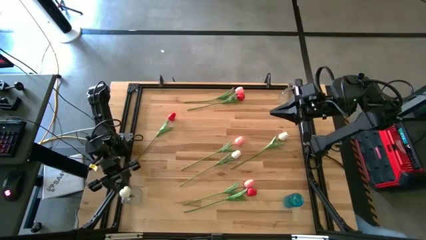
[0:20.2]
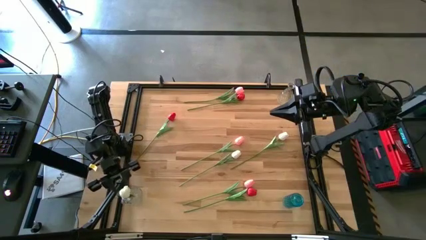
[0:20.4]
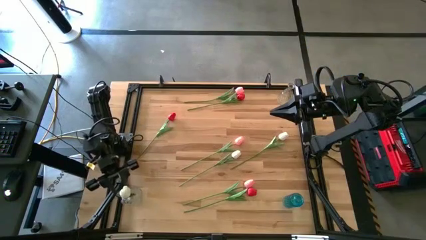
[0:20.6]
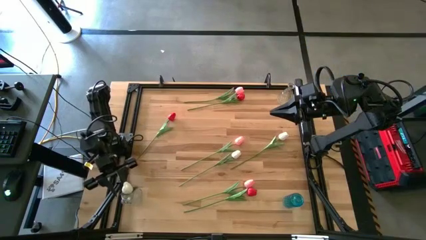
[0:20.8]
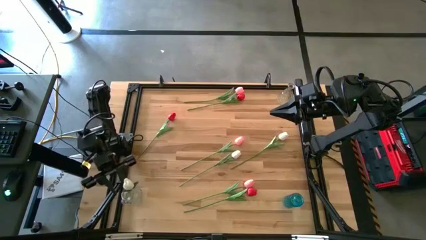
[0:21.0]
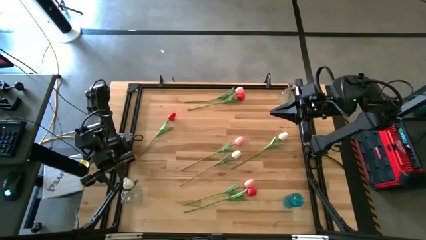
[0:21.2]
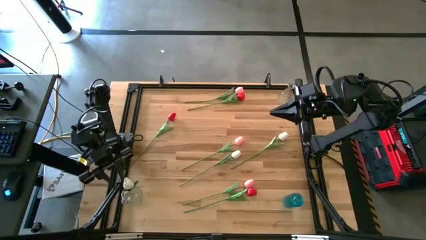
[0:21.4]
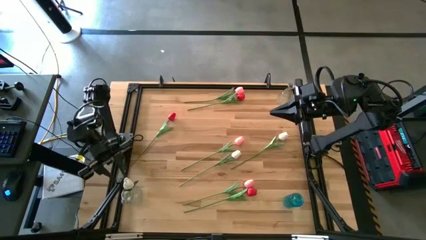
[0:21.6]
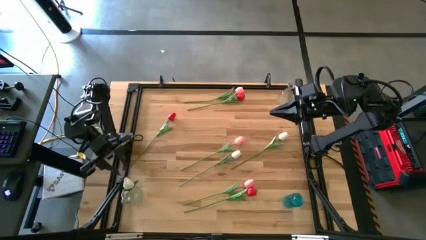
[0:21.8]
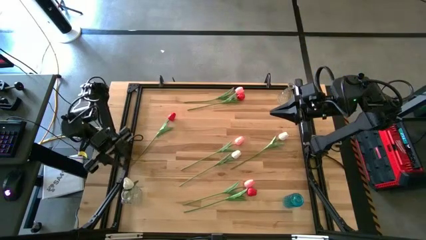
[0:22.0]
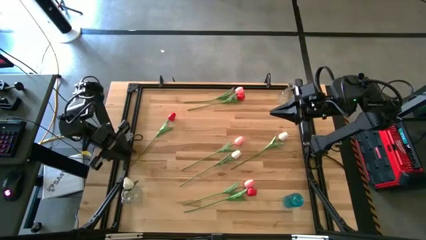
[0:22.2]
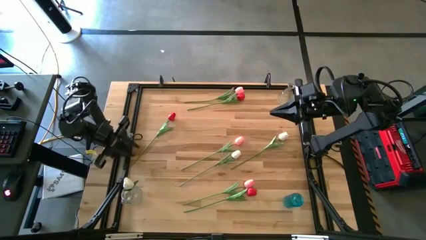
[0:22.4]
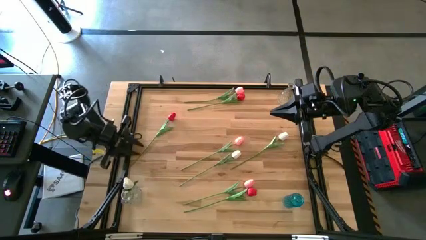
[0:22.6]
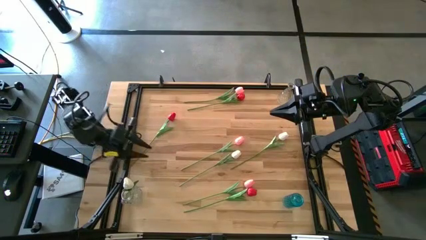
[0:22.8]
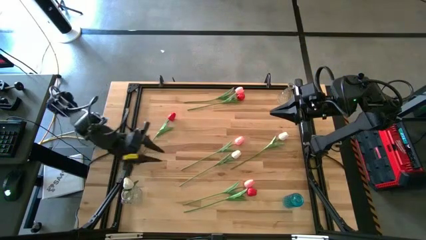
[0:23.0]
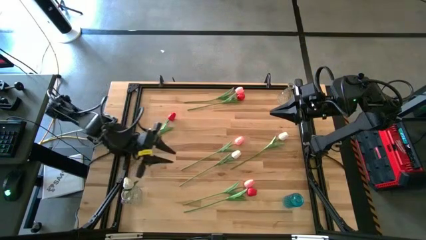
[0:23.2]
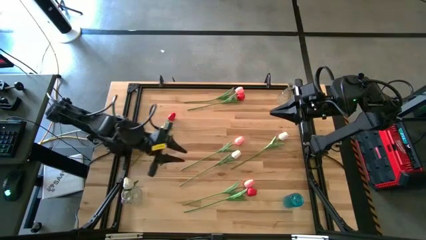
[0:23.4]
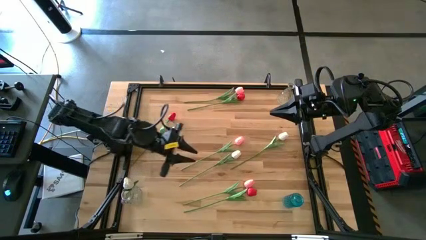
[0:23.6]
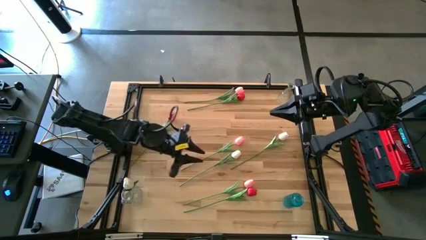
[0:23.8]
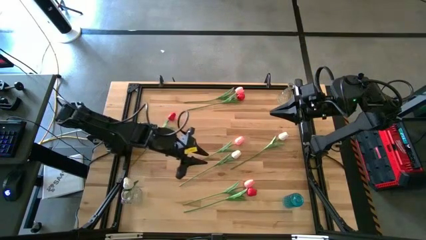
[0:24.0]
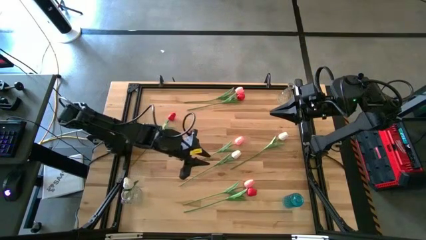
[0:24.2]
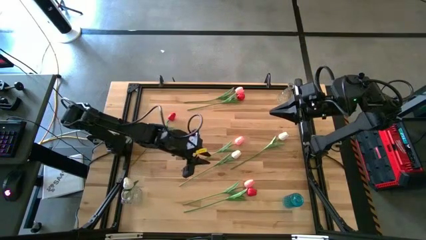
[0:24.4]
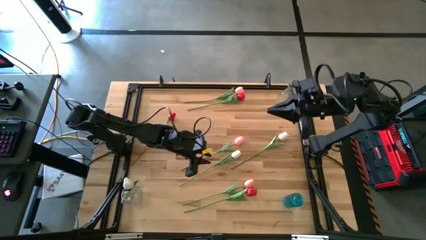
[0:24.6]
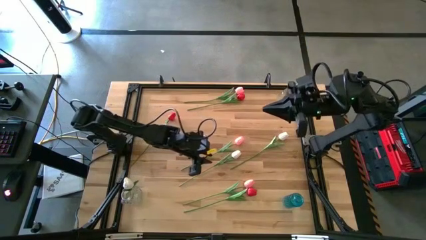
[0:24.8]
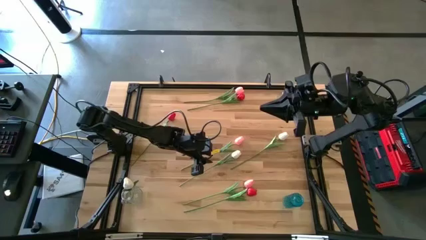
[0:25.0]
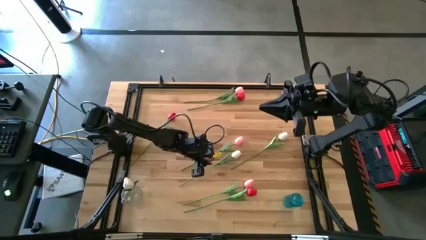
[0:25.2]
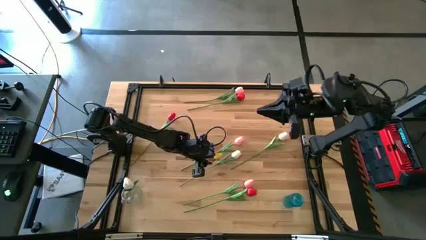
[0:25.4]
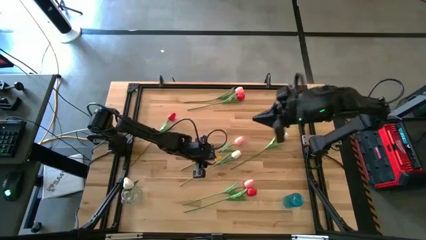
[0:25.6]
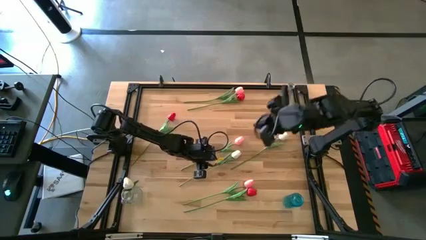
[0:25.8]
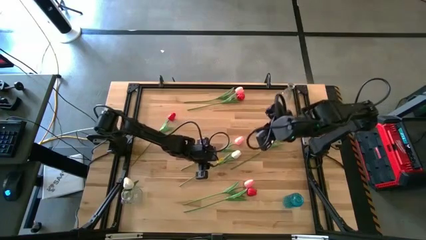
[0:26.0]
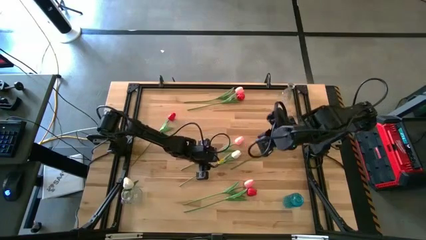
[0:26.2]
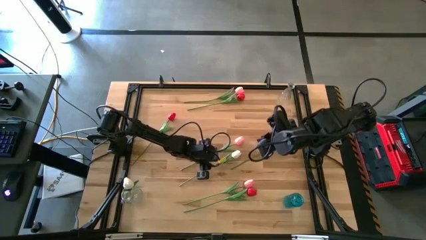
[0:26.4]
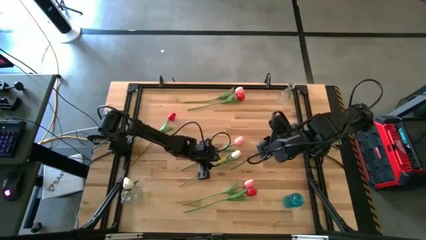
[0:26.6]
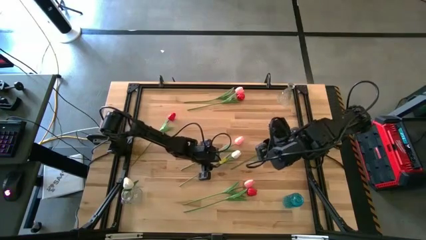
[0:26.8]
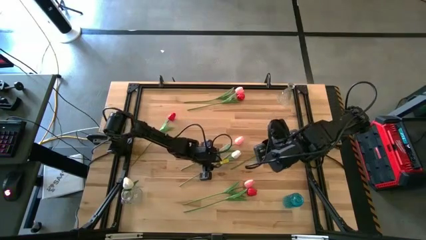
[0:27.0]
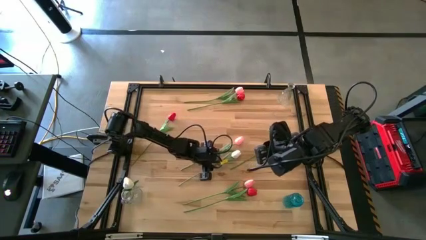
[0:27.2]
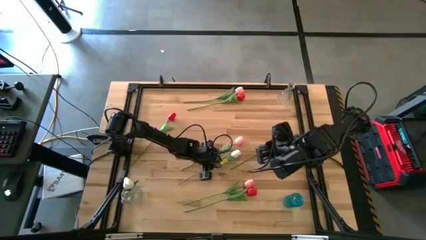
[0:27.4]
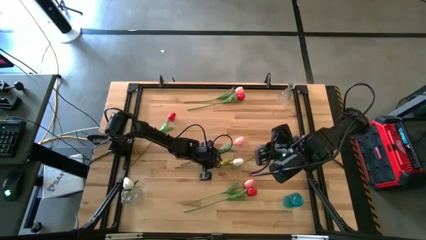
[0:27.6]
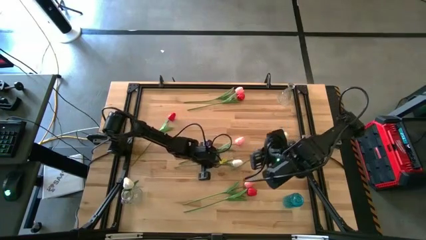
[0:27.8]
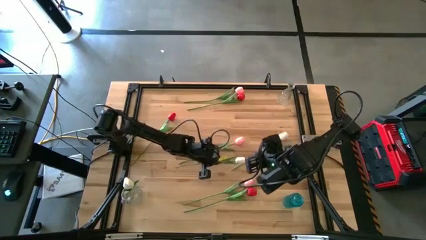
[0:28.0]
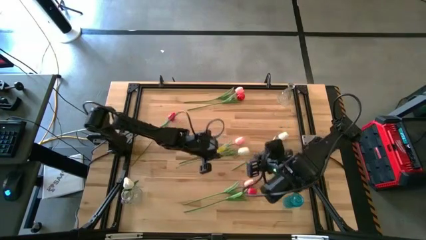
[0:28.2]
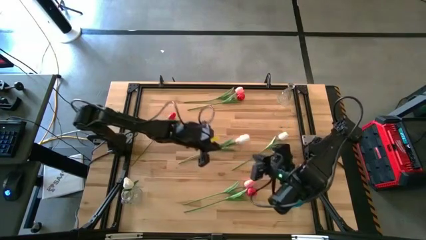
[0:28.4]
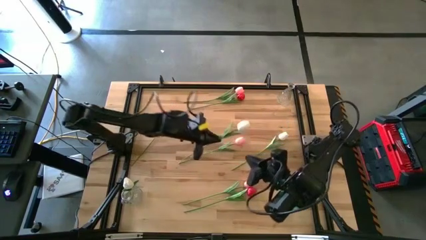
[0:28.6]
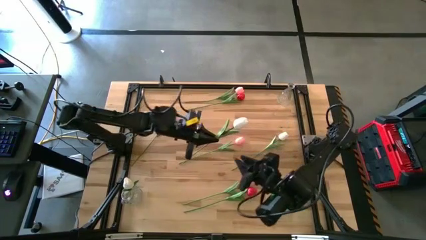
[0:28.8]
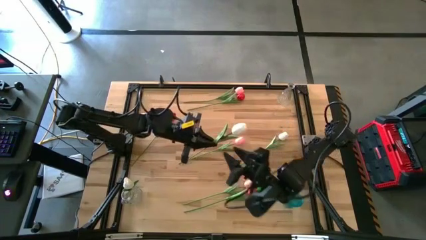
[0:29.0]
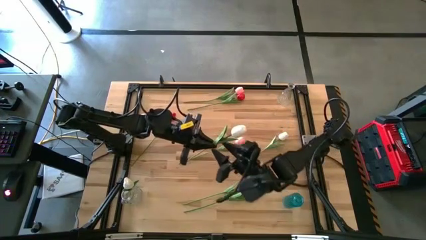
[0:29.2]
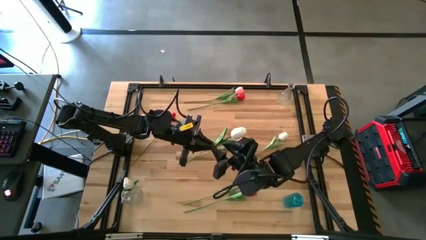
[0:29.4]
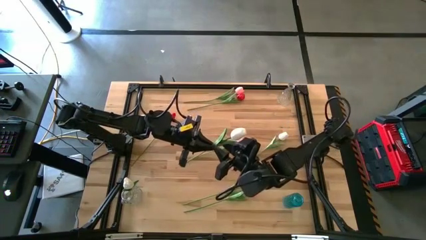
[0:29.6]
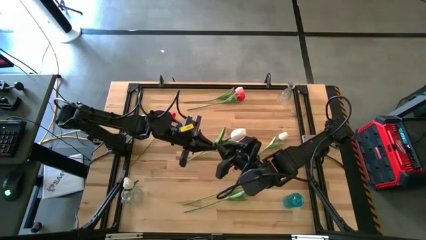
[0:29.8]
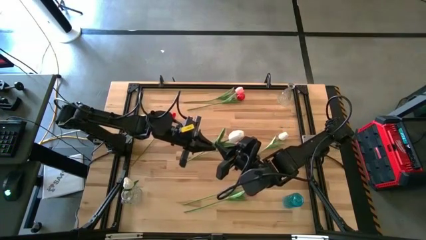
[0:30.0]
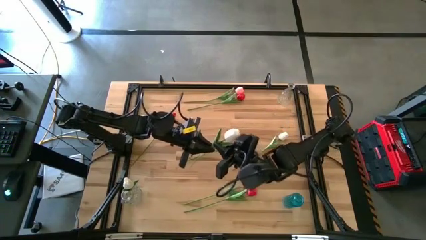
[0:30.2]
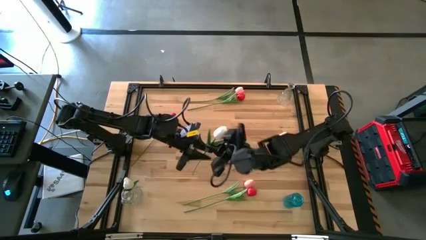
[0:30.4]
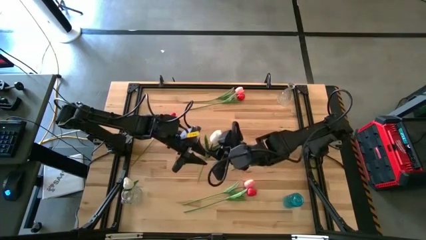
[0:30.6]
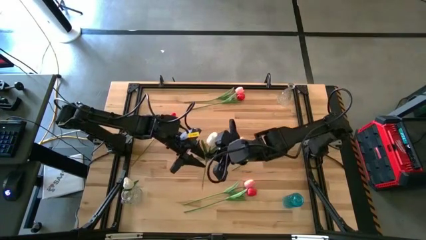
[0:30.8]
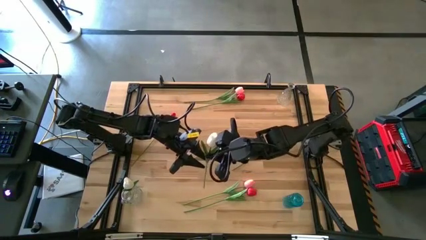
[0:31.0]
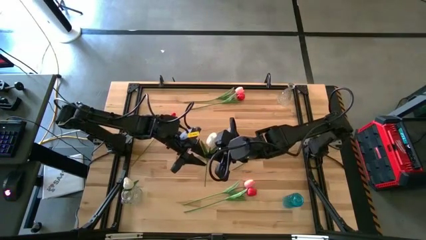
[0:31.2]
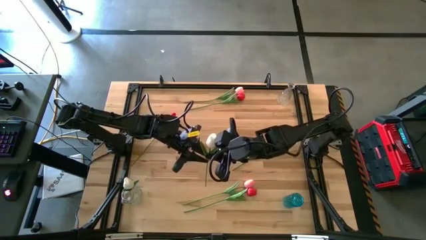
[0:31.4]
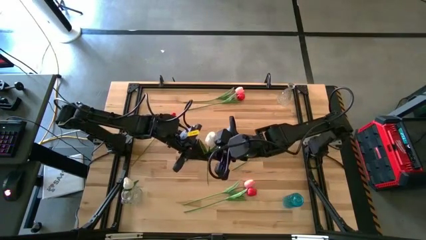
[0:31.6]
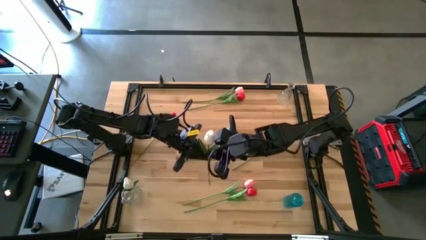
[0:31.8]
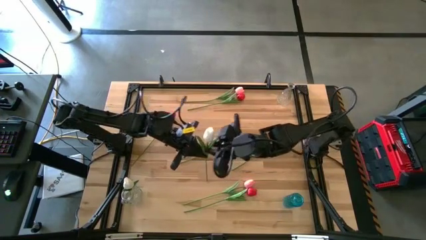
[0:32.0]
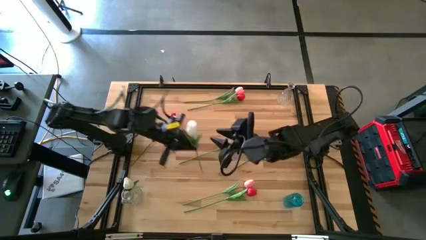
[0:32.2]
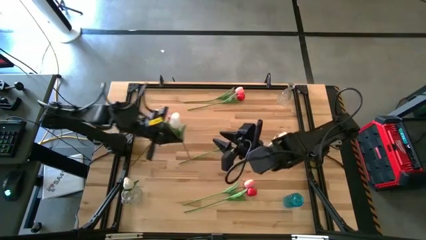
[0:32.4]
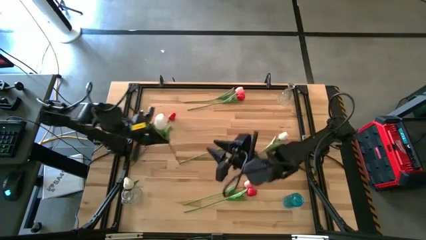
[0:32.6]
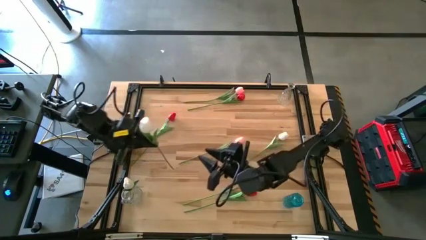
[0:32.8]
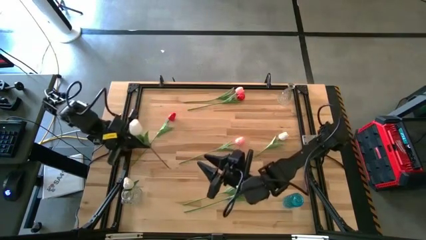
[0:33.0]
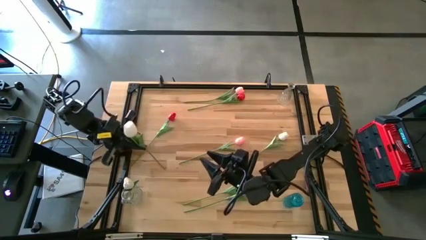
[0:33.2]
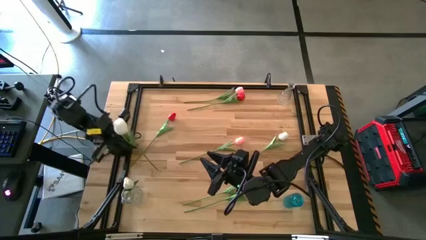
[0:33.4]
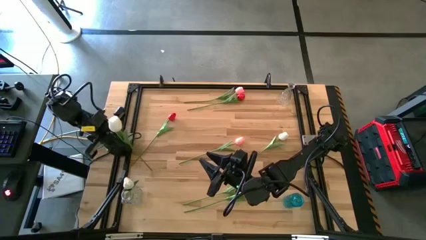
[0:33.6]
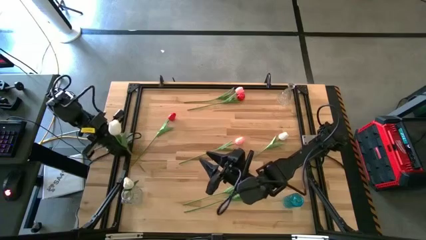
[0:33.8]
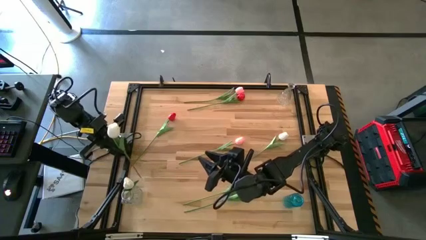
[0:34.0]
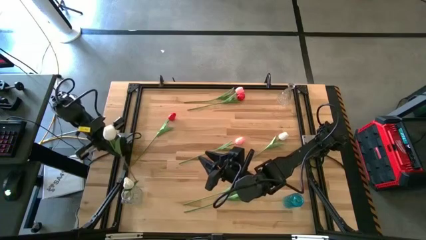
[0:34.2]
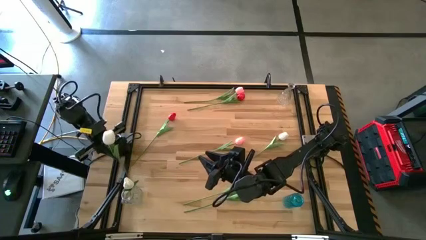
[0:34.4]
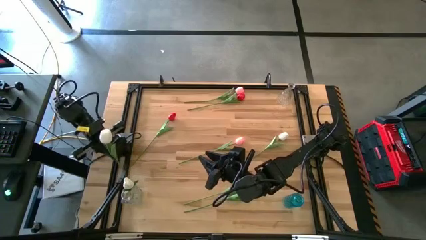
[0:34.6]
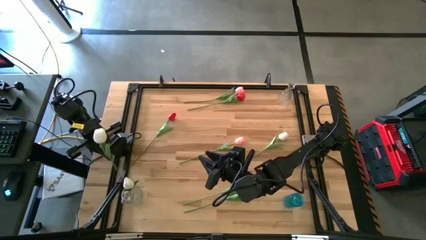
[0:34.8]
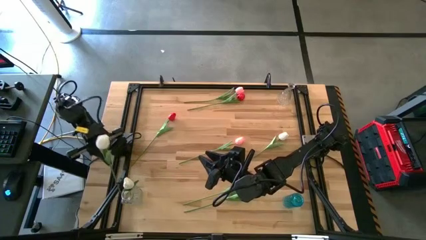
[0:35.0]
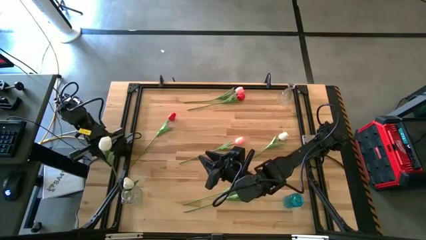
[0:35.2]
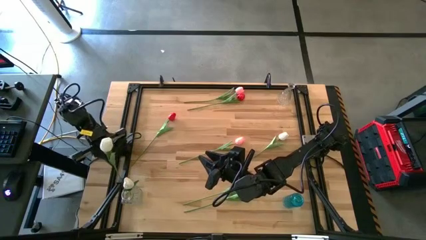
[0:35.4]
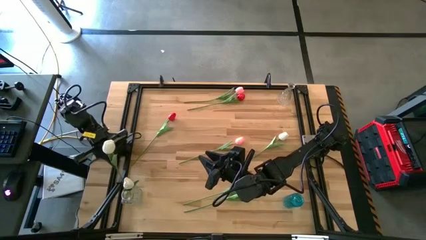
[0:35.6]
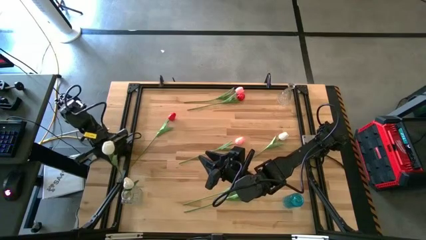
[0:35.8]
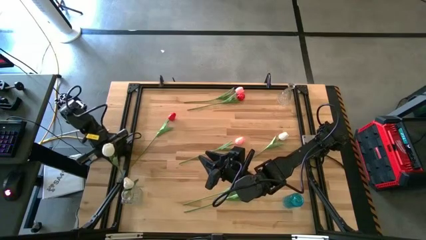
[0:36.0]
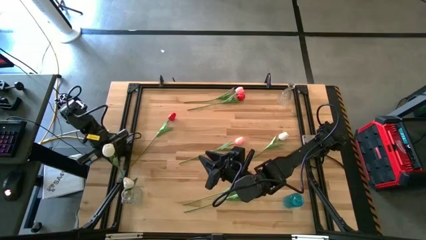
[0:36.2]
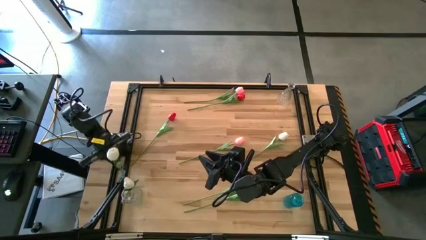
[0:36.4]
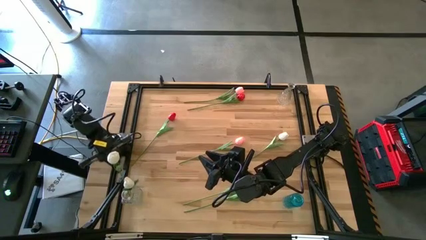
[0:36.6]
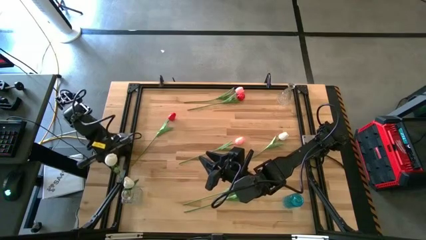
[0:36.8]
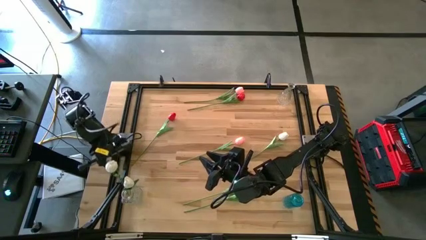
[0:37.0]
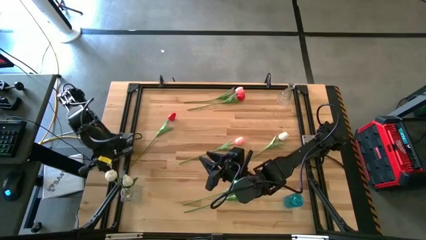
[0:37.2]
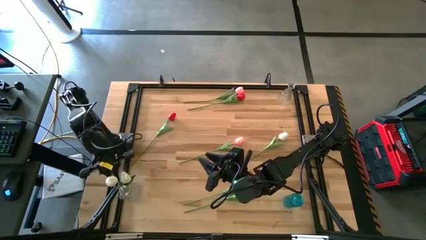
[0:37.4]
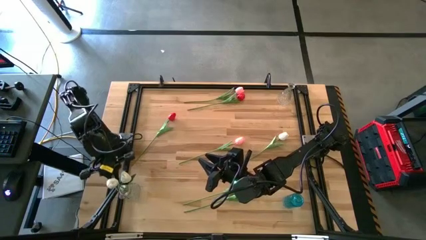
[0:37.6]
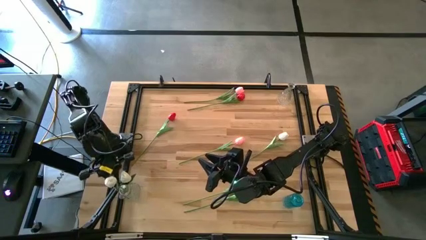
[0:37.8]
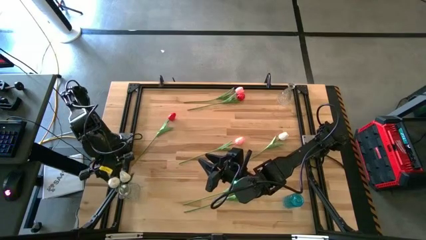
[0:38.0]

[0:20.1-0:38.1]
Task: Sort flowers into vase by color
Put the bottom white flower into the bottom transparent vase
